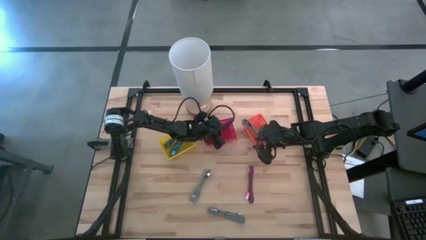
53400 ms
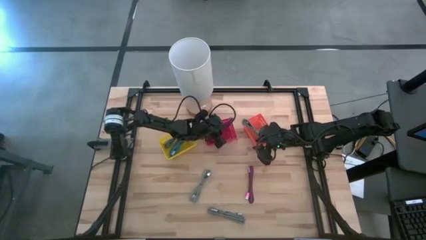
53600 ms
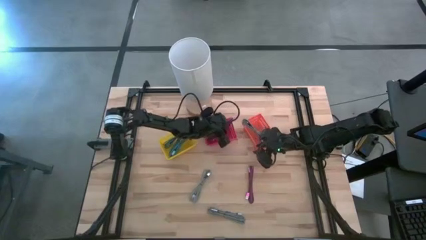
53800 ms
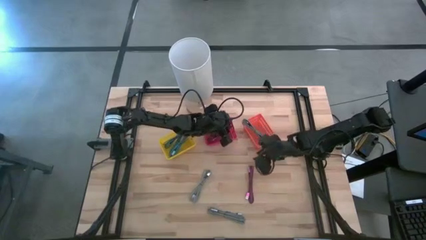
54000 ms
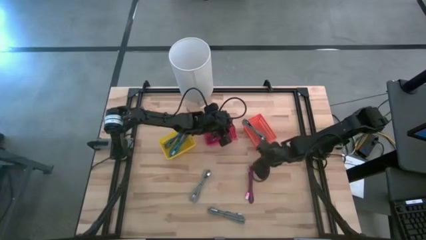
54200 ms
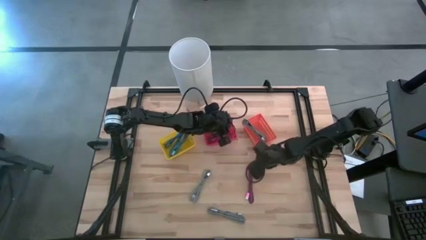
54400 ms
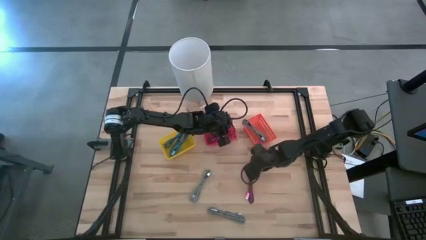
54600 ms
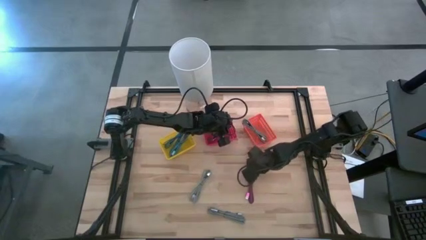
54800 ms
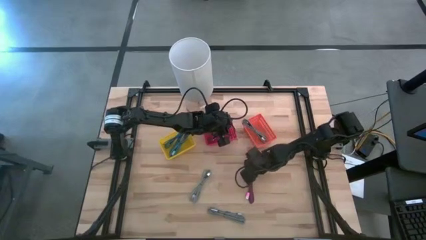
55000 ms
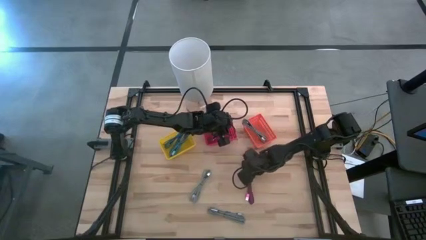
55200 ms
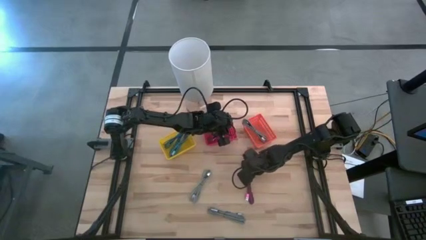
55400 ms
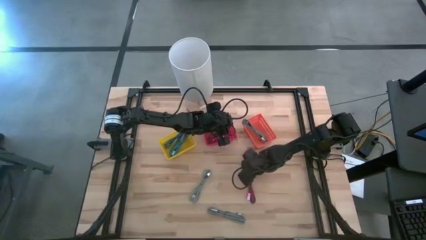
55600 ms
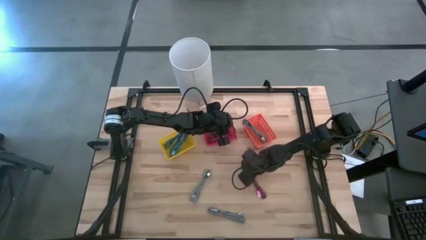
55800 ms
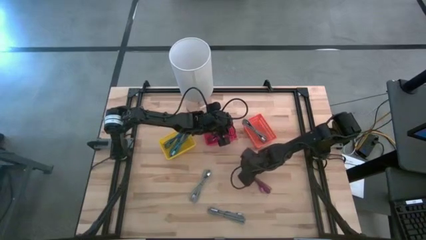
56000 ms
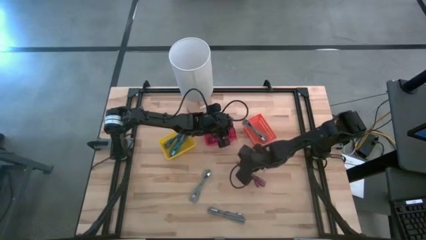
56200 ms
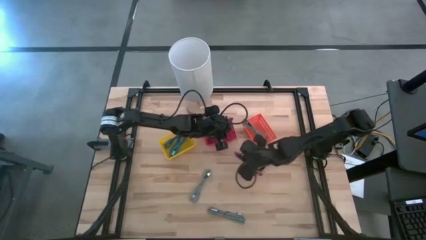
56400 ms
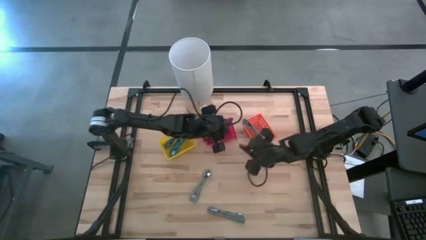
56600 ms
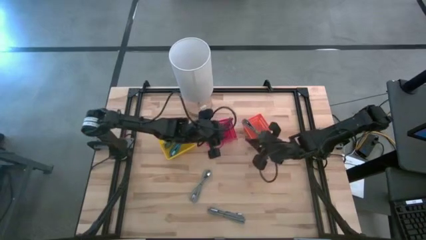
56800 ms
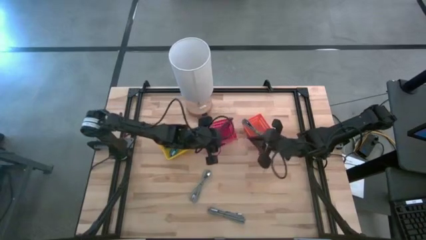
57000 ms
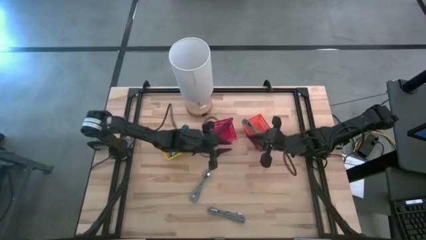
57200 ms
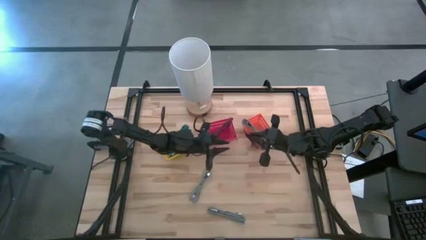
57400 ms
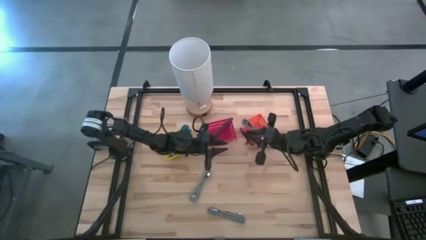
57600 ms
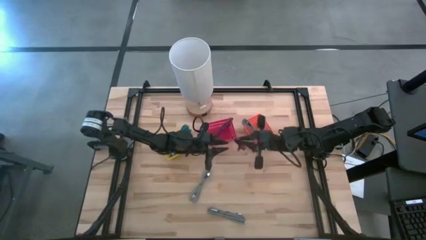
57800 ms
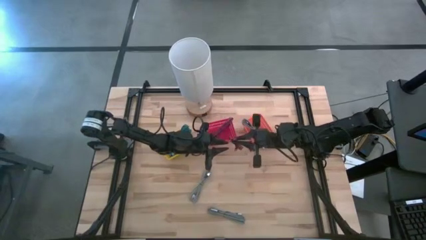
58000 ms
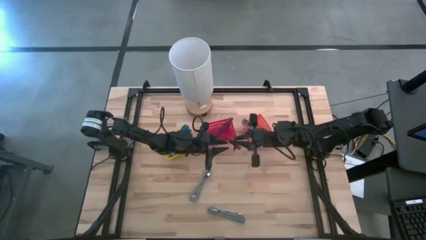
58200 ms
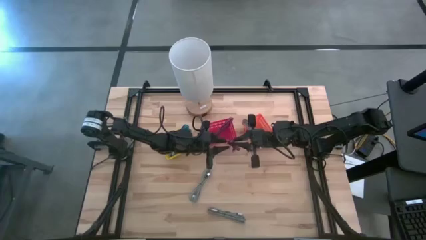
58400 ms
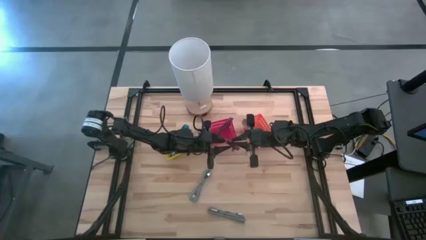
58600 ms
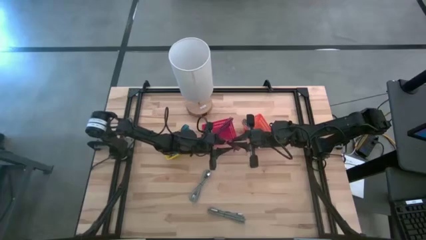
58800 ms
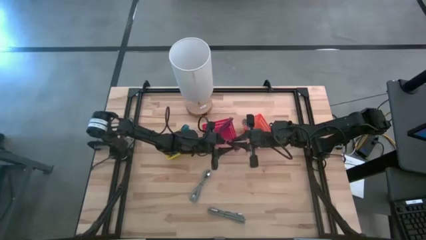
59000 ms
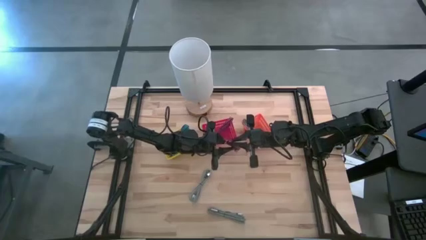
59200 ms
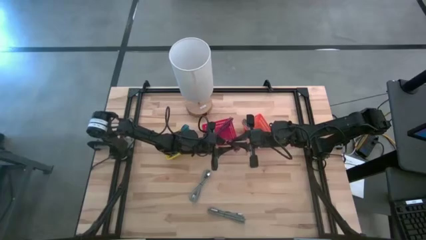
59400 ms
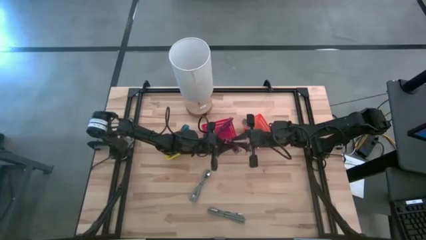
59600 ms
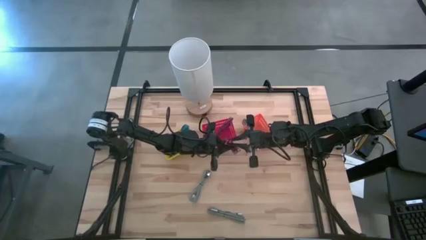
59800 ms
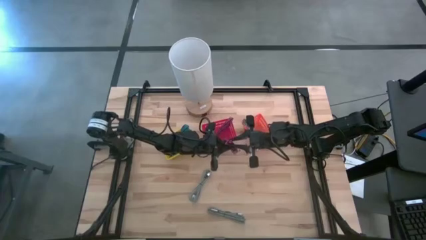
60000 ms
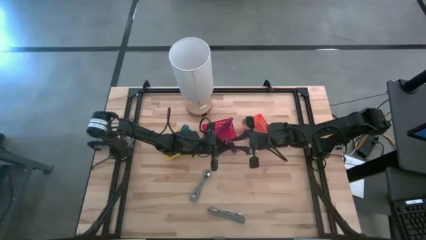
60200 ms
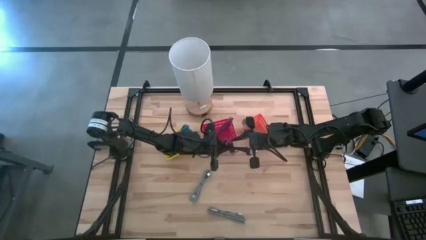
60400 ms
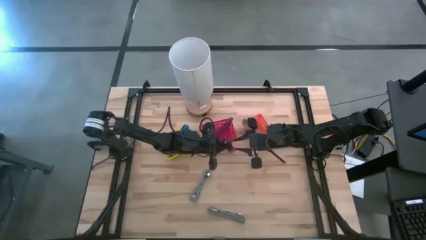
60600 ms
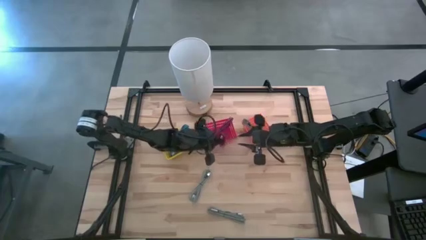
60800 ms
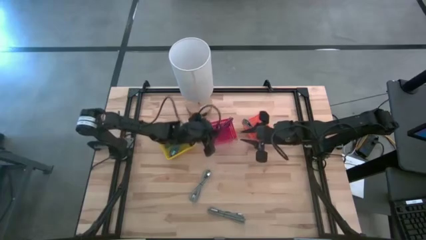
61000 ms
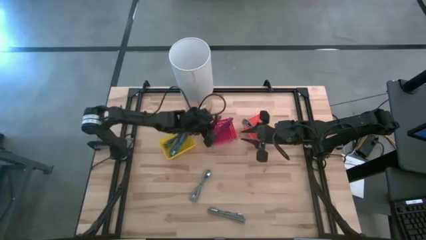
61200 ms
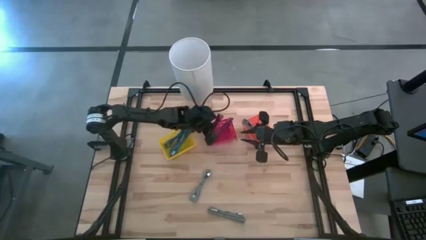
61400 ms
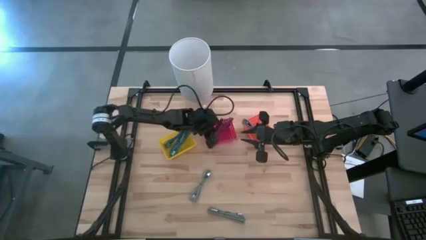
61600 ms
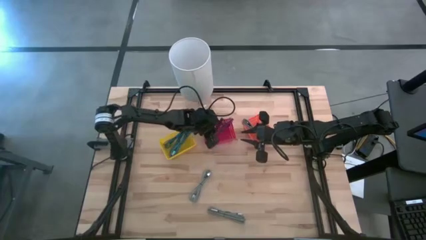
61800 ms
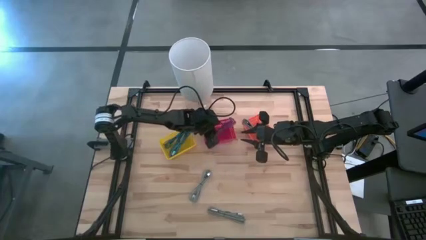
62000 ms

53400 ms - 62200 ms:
Task: Pick & Place USB Port
Put the pink charger cable into the red bin

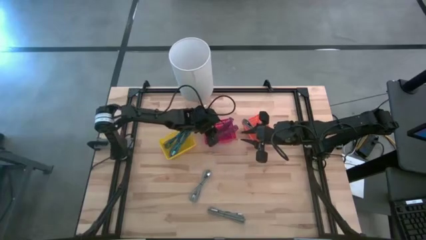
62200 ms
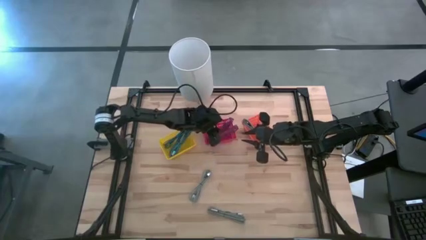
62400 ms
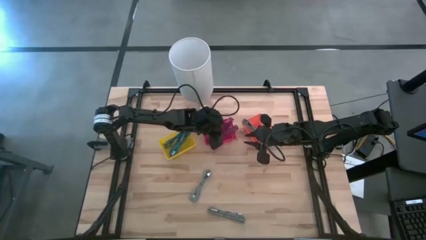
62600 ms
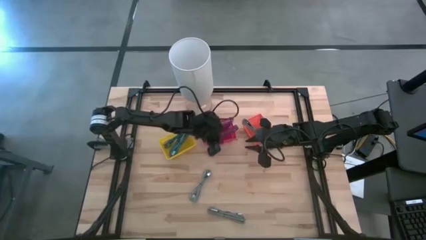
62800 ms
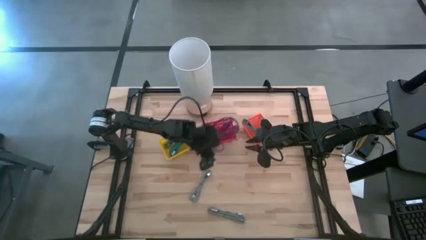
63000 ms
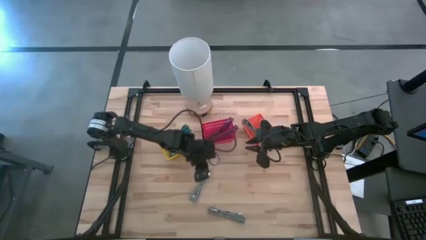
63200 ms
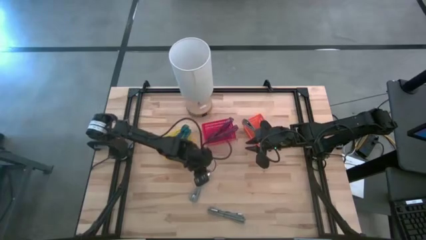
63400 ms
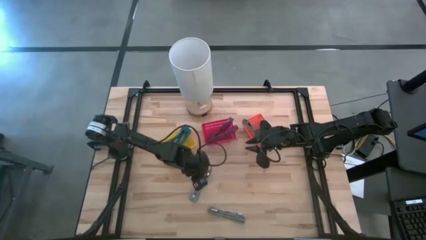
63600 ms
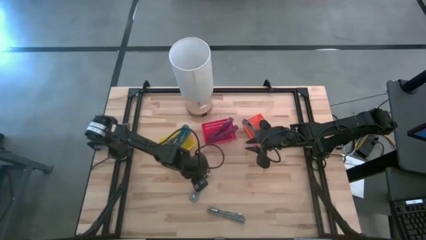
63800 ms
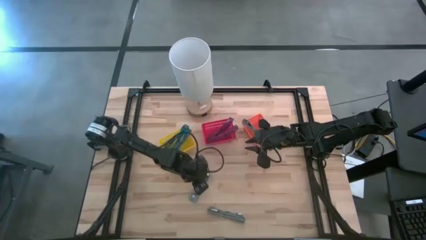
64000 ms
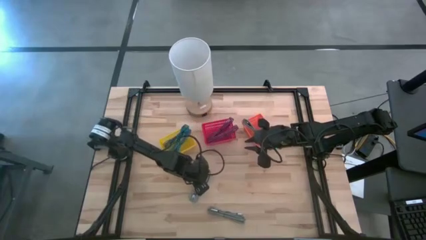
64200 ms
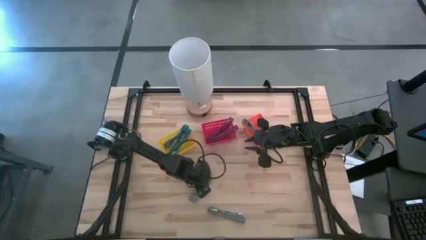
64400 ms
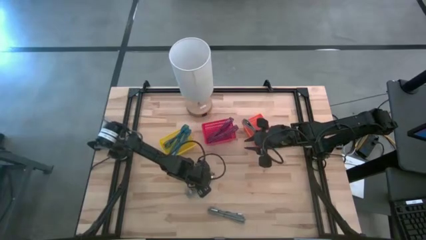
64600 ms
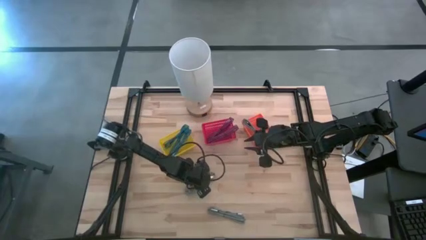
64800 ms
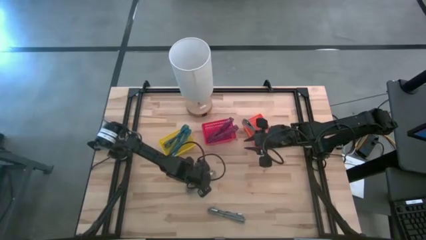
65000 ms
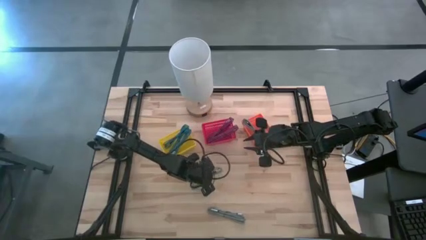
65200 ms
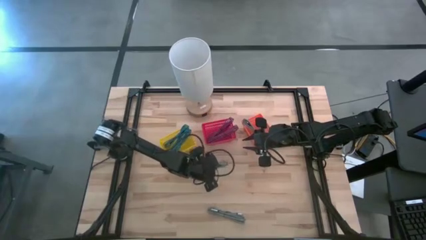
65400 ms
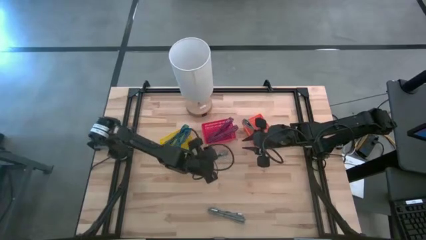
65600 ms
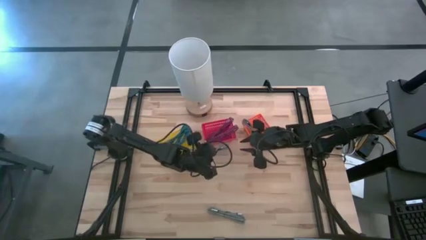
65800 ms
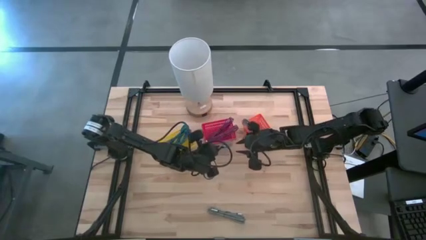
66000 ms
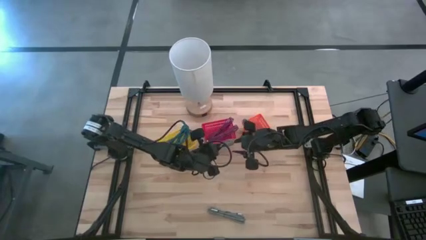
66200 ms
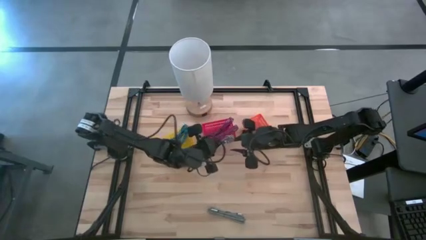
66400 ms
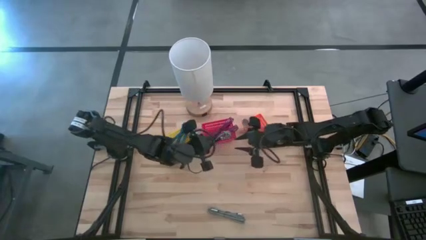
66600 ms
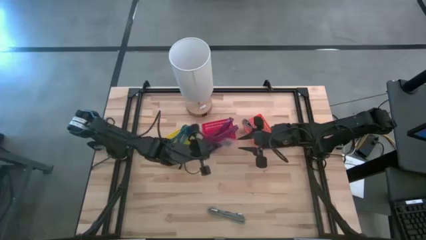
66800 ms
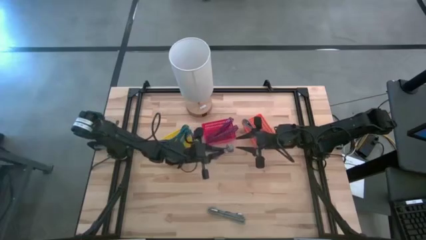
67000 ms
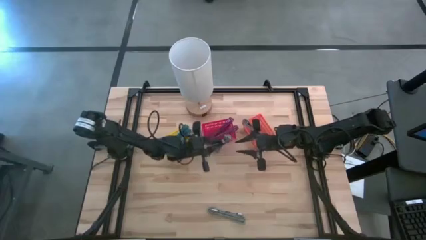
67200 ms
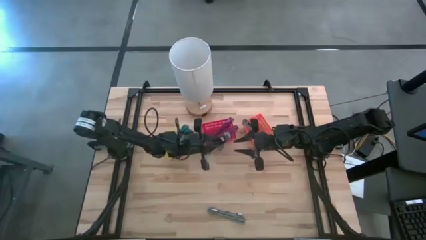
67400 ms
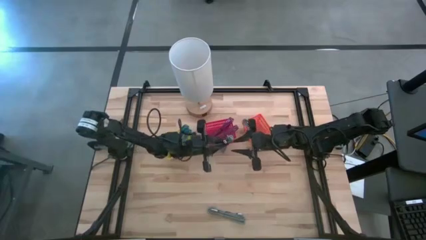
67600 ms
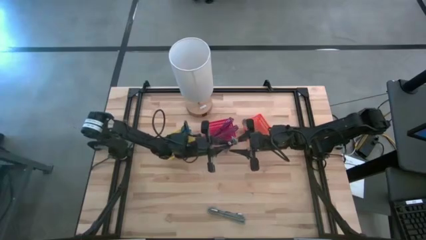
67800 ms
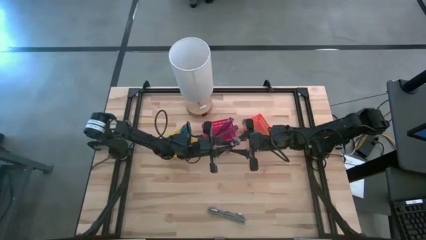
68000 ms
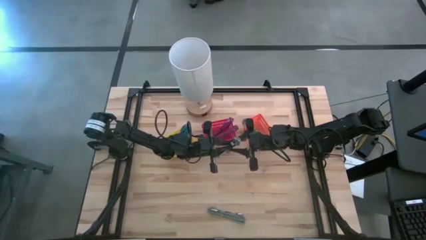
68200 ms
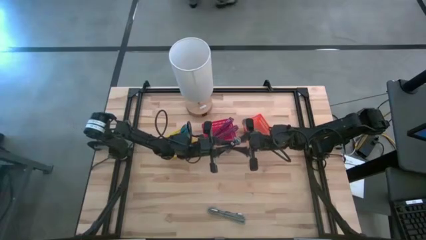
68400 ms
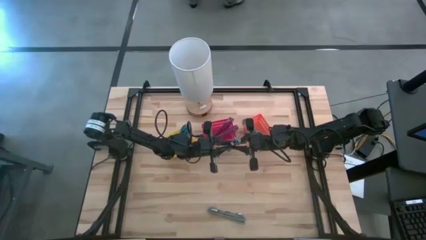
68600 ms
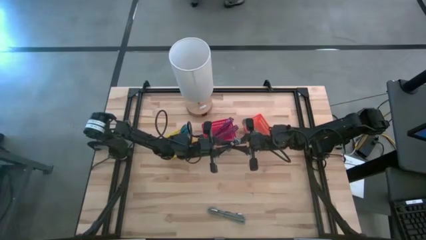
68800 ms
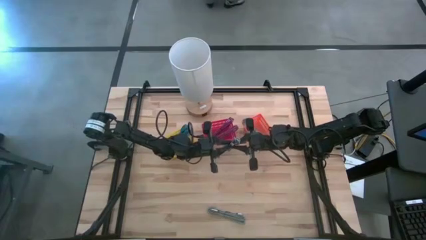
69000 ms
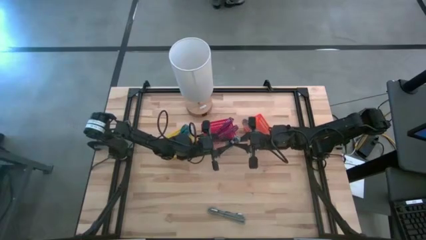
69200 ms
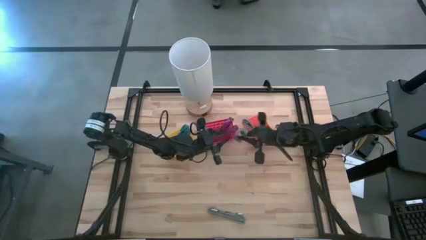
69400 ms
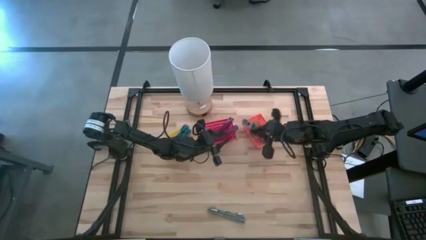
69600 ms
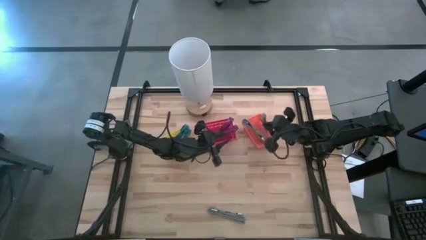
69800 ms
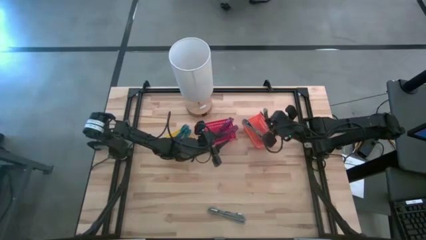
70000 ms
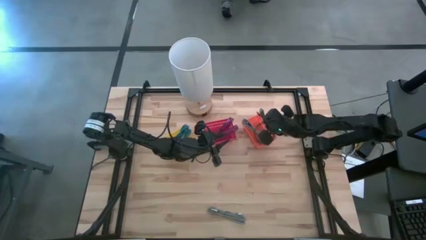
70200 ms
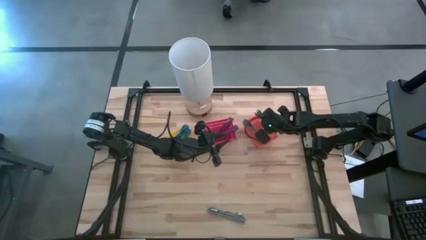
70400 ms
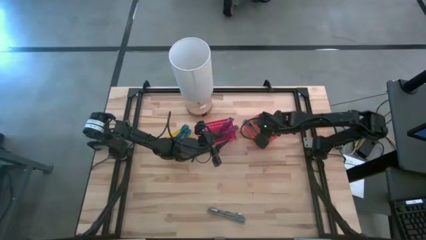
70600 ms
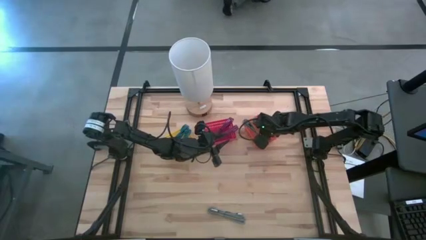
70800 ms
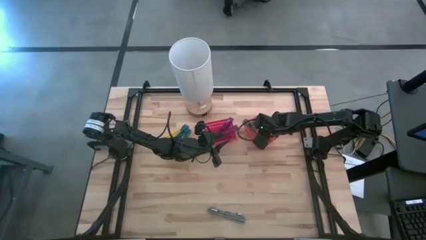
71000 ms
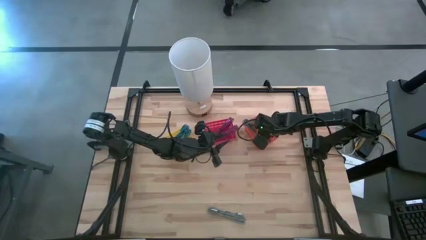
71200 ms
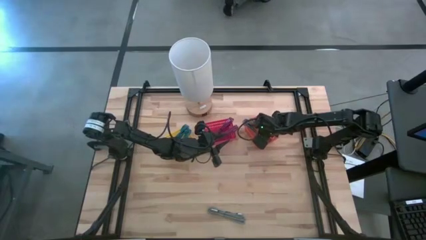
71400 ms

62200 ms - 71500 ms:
Put the top black and white charger cable into the orange bin
